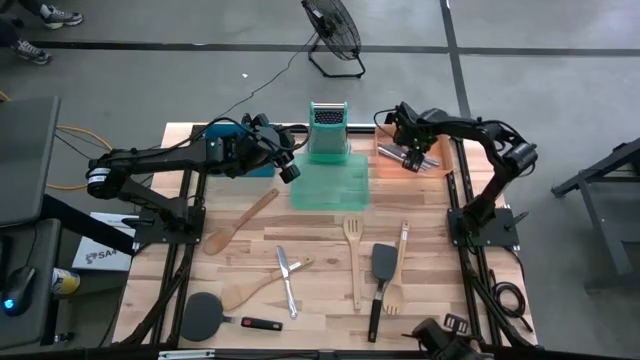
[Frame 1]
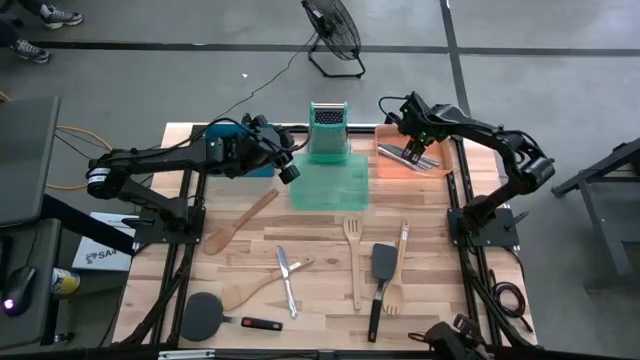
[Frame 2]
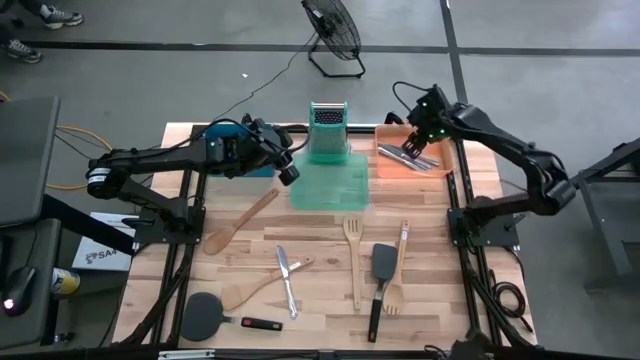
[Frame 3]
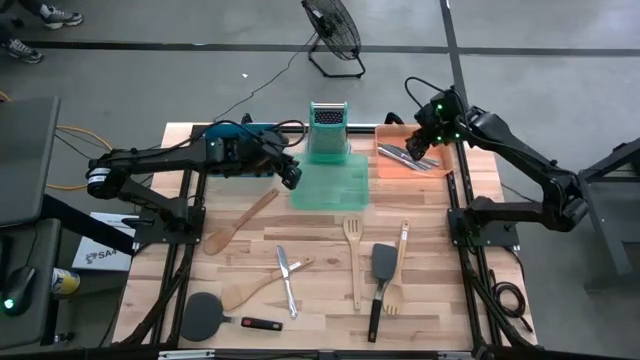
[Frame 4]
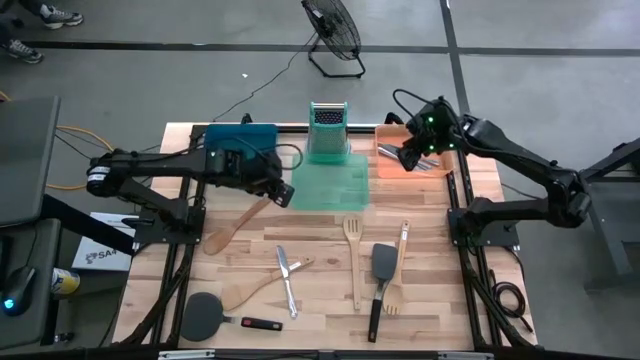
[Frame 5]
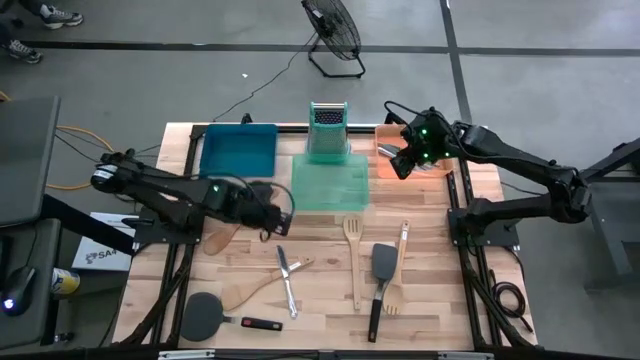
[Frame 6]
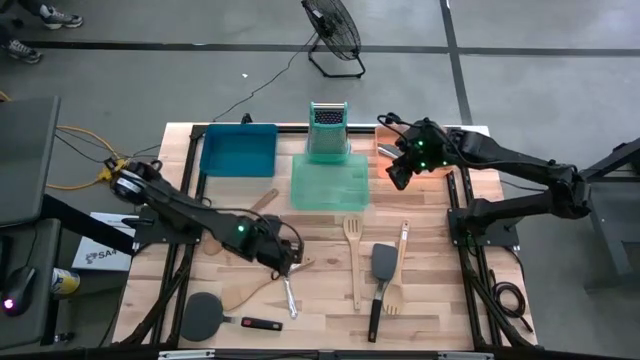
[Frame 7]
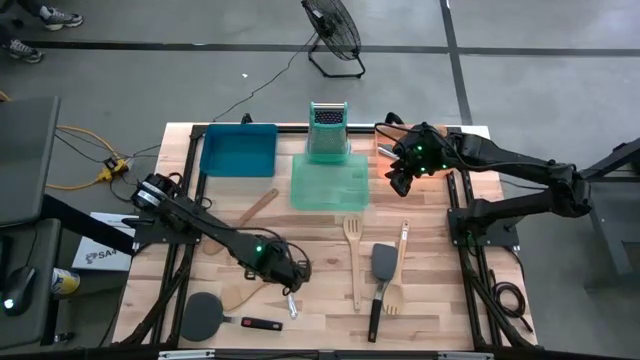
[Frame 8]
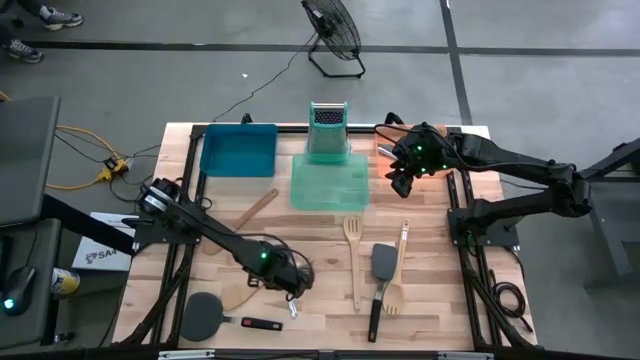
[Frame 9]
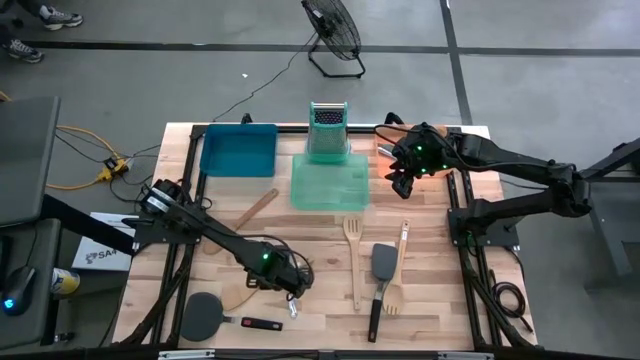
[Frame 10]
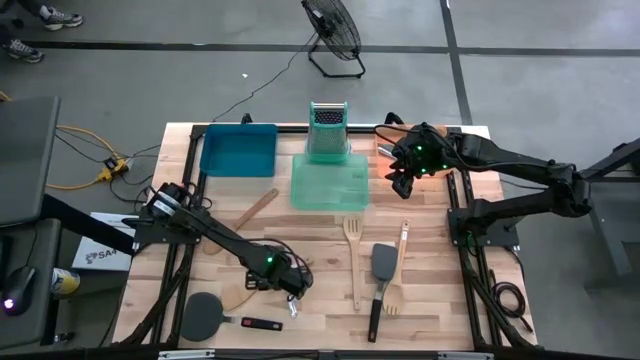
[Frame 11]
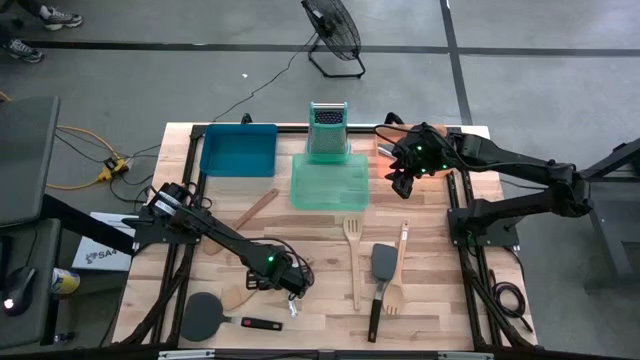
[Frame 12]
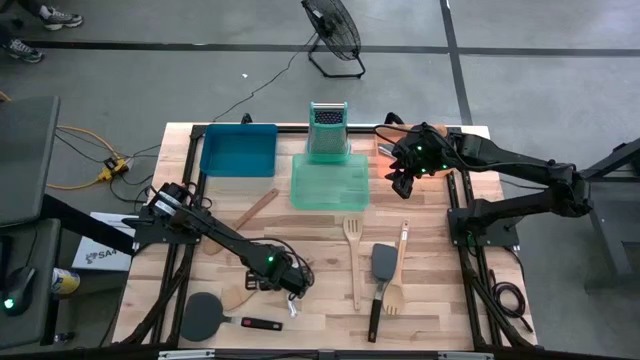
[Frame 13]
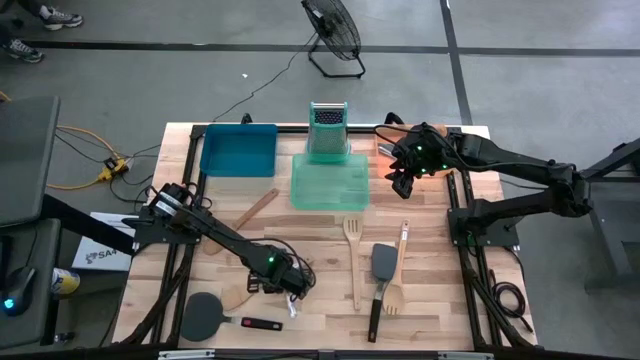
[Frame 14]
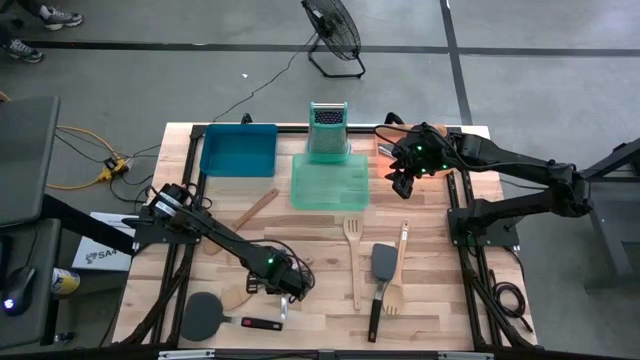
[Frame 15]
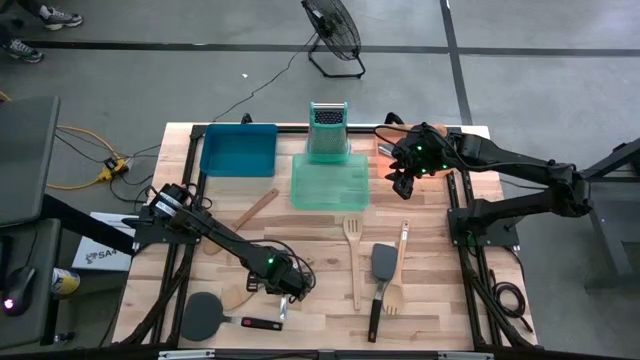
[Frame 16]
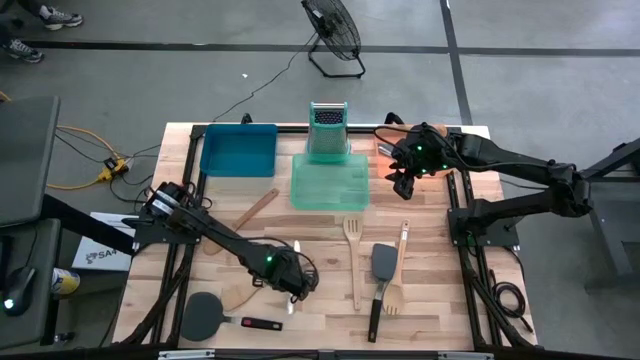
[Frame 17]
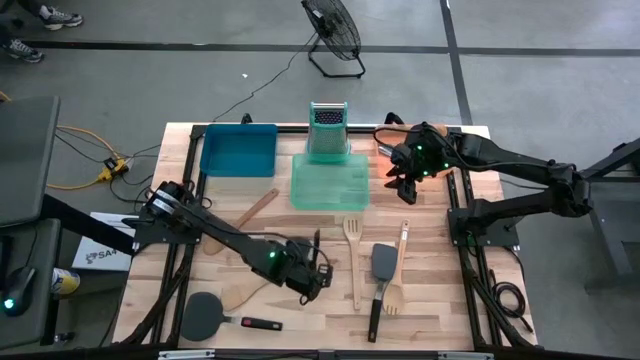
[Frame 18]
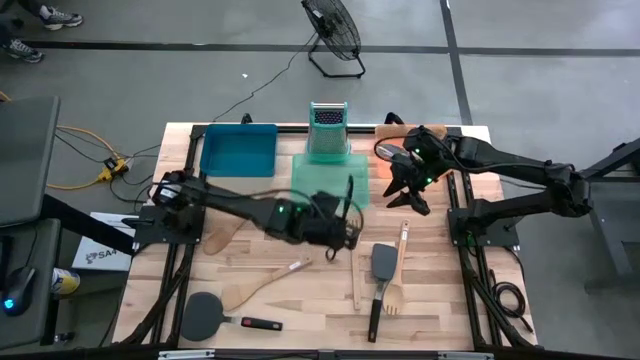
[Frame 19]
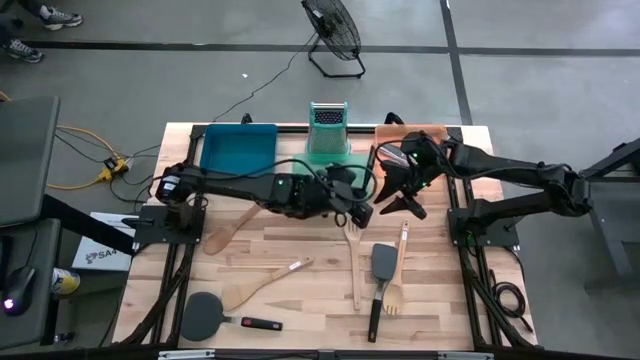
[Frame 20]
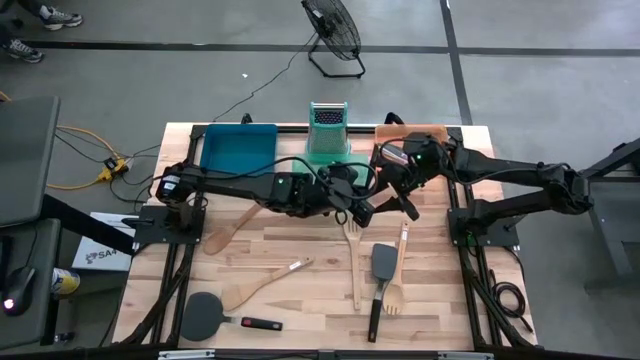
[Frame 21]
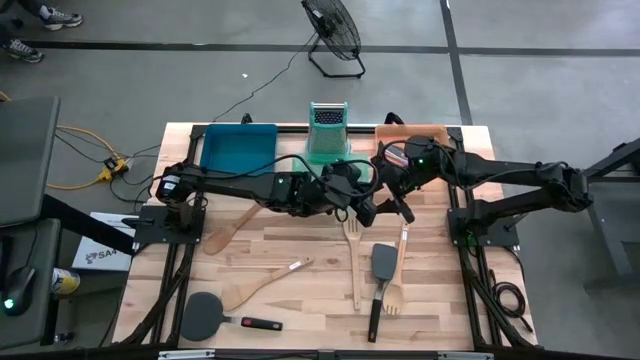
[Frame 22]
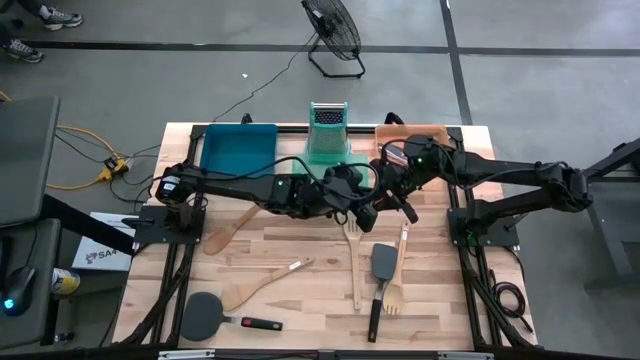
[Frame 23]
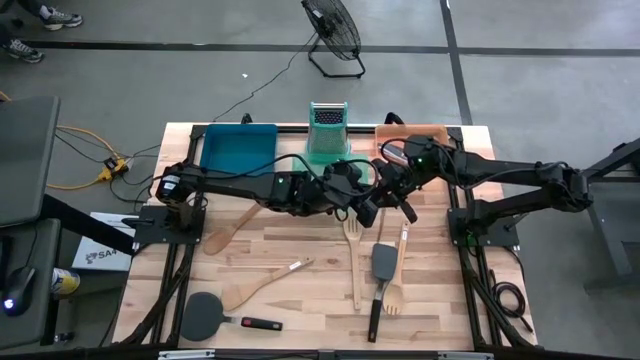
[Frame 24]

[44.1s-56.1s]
Task: Pick & Place Kitchen Items
Put the silver knife into the orange bin

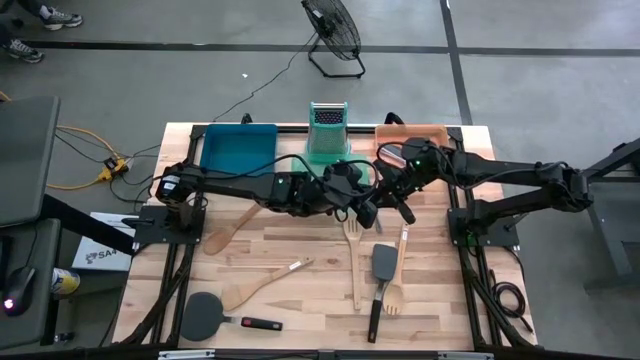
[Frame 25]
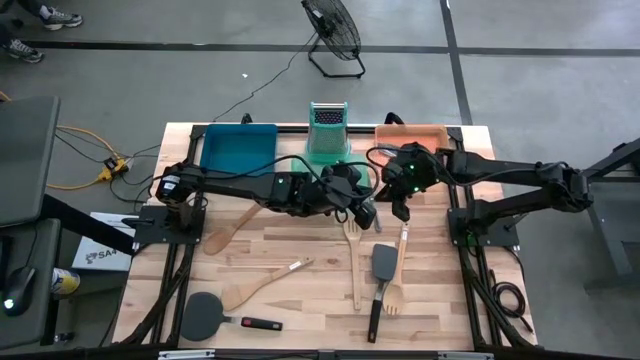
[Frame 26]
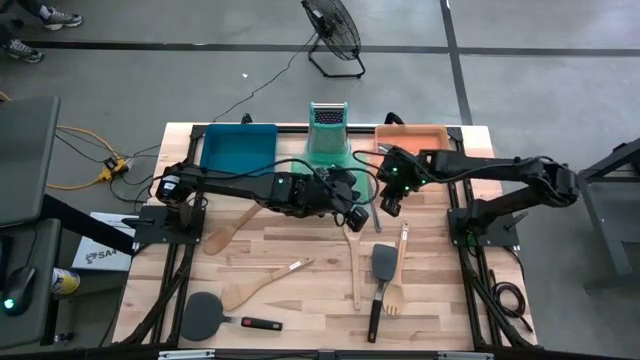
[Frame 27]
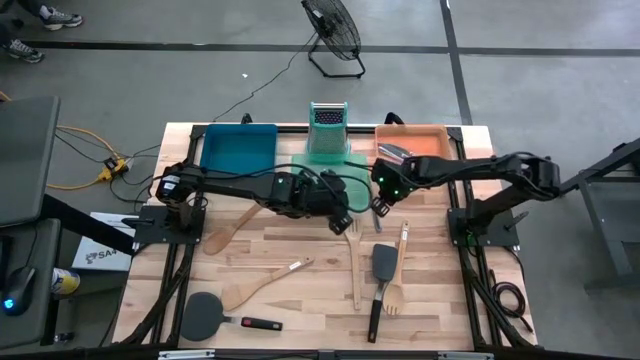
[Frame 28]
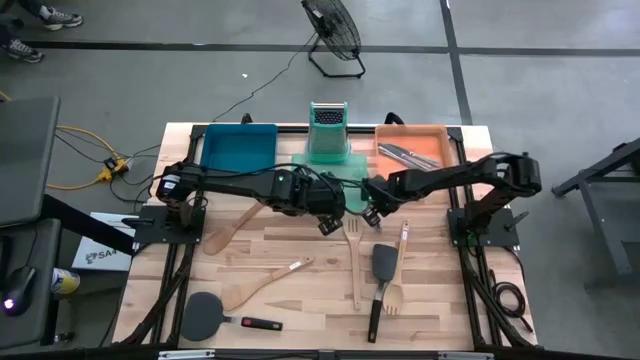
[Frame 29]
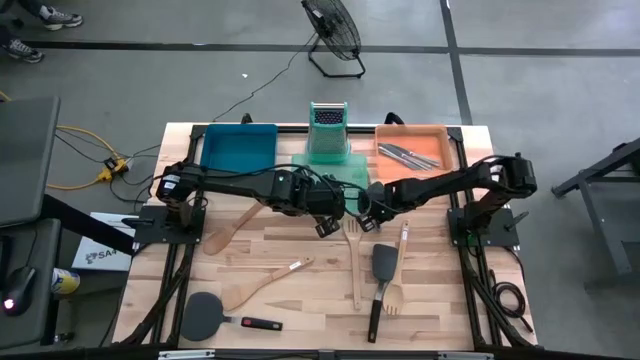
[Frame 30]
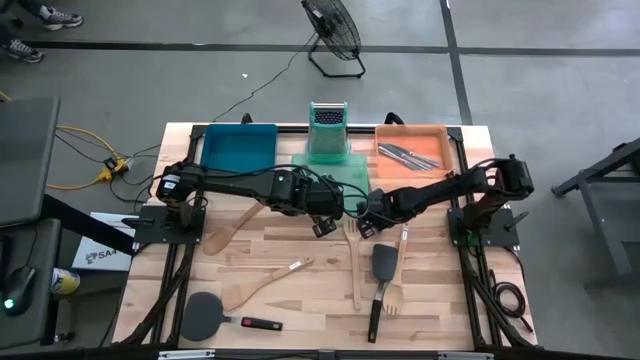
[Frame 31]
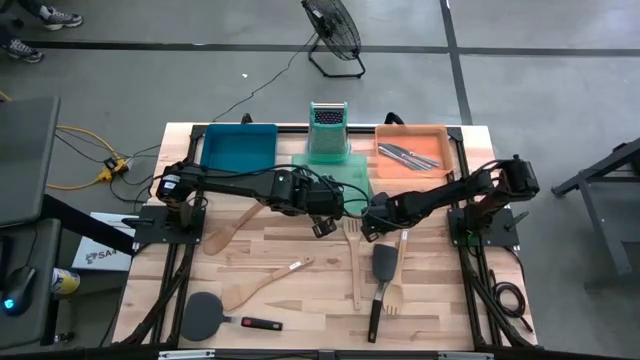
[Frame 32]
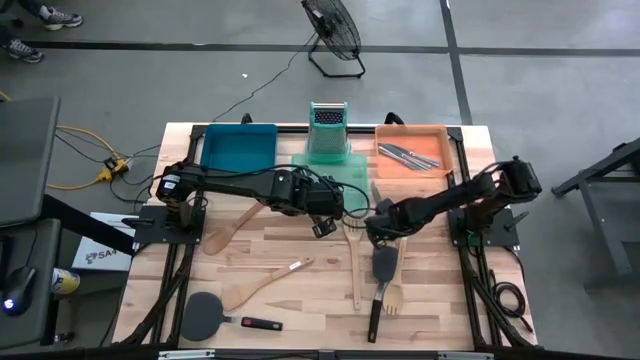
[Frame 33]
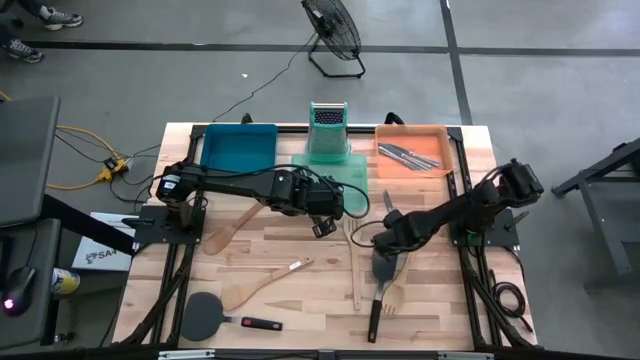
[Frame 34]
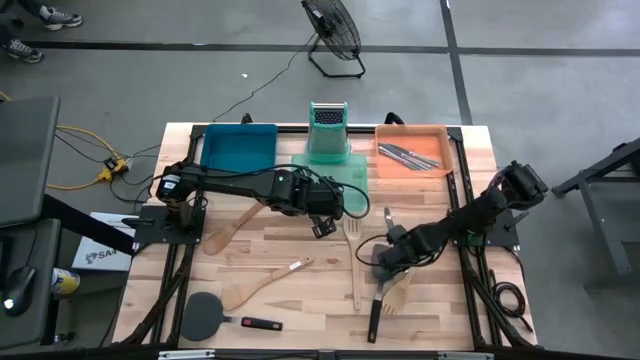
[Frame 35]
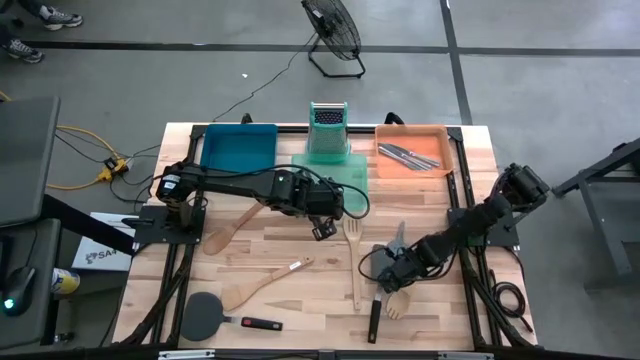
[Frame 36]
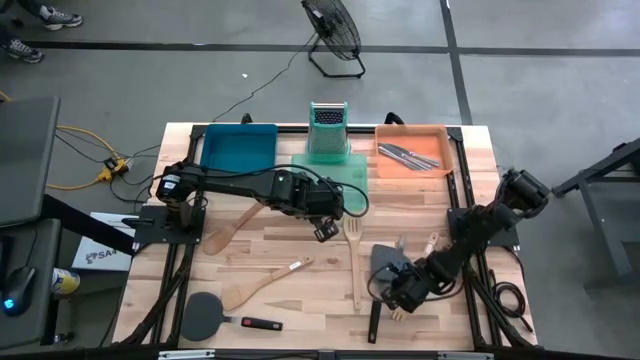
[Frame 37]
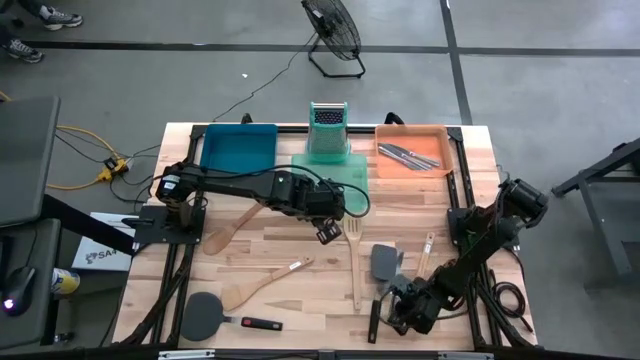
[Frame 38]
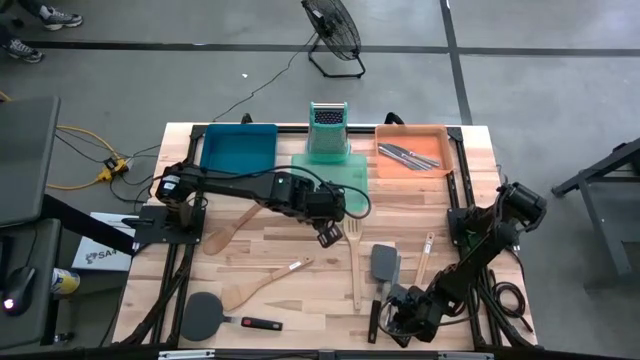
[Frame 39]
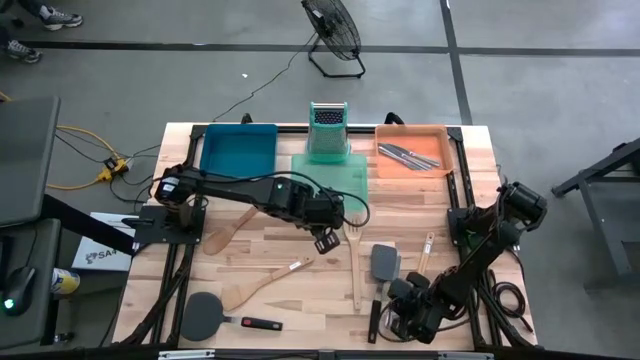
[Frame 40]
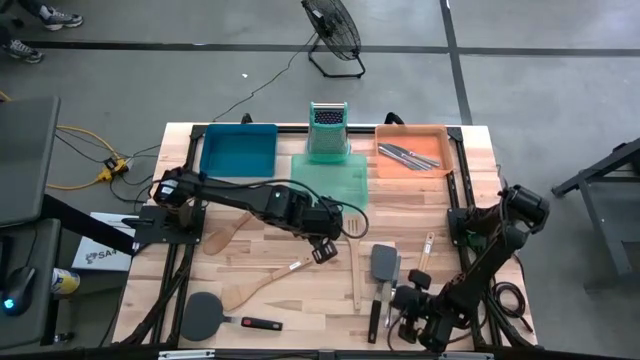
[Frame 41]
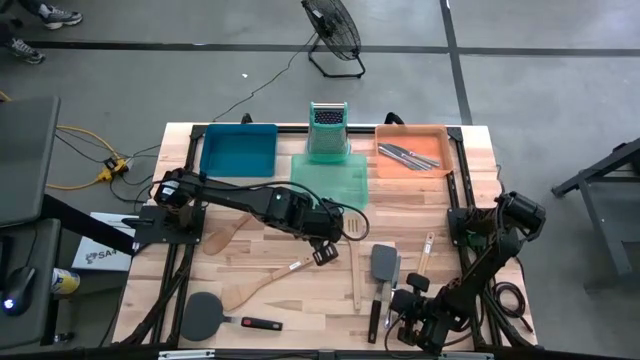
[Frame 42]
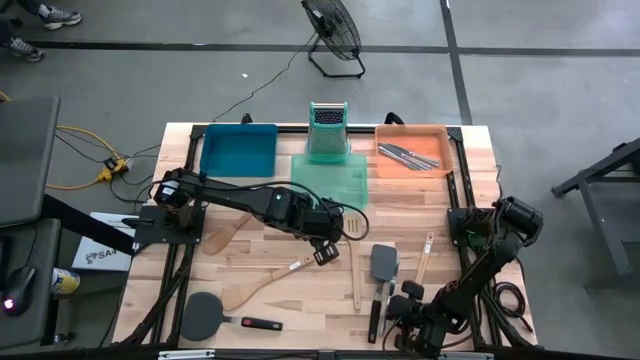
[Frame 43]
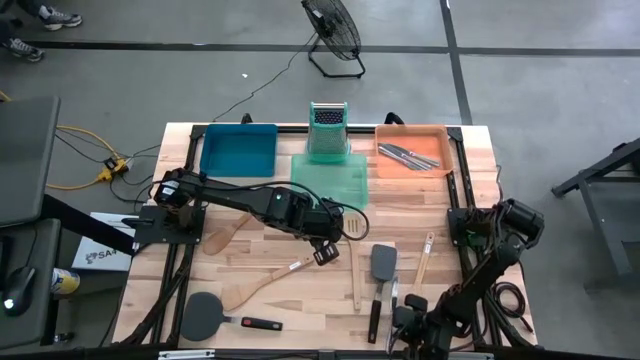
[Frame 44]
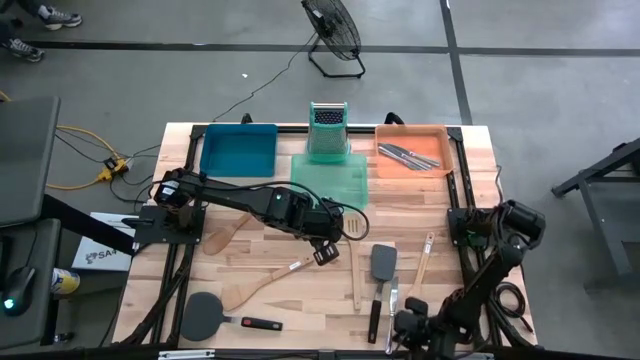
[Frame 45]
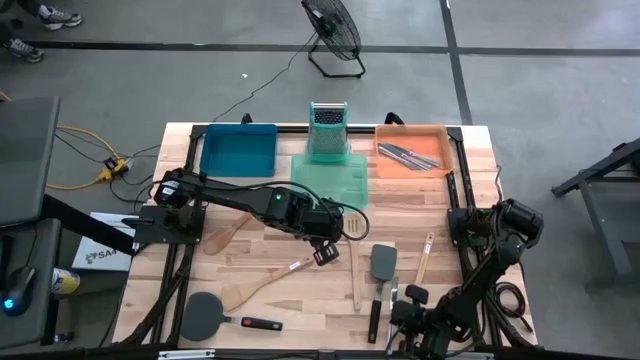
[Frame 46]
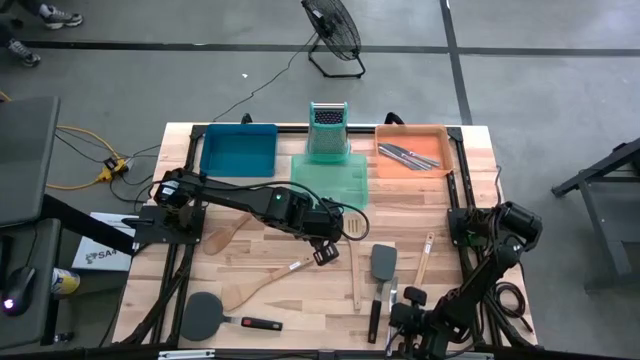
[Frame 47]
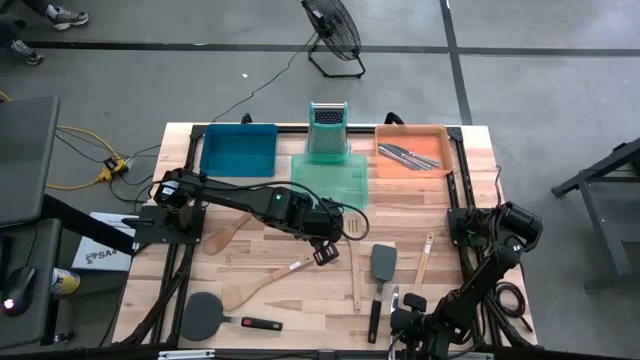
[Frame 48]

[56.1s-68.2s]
Put the silver knife into the orange bin
